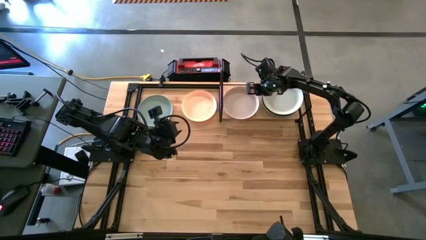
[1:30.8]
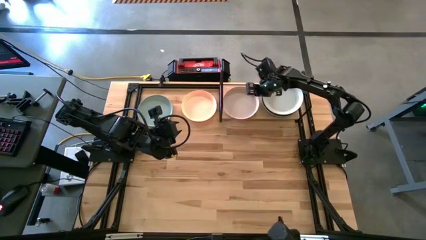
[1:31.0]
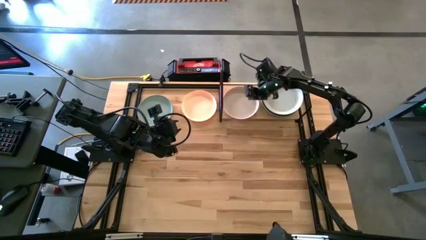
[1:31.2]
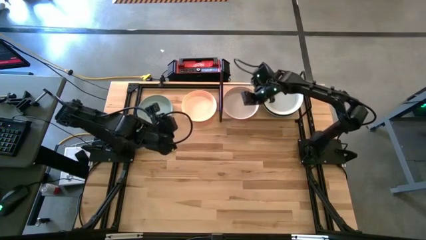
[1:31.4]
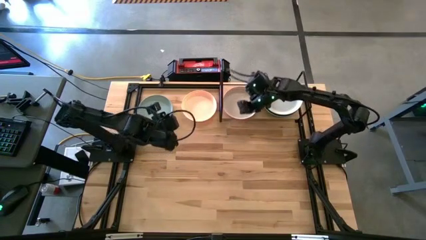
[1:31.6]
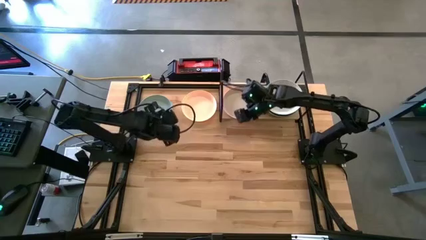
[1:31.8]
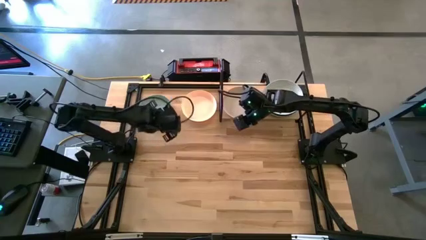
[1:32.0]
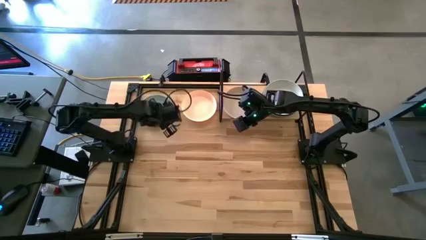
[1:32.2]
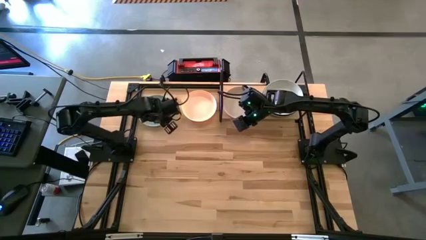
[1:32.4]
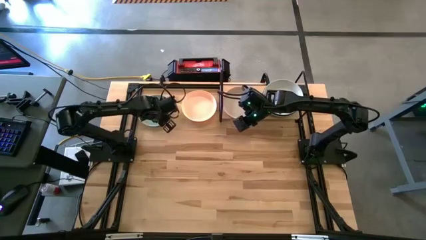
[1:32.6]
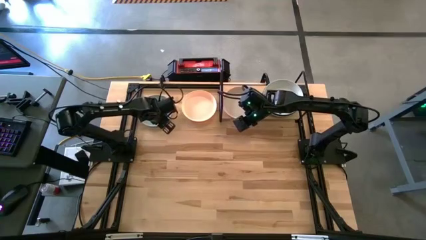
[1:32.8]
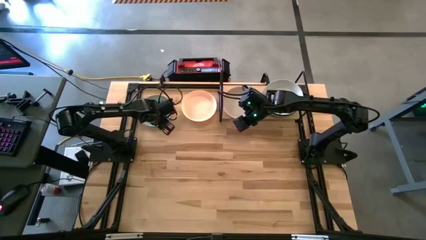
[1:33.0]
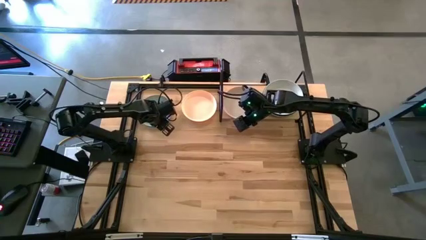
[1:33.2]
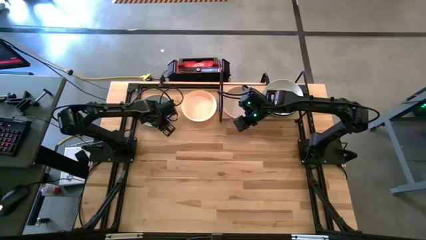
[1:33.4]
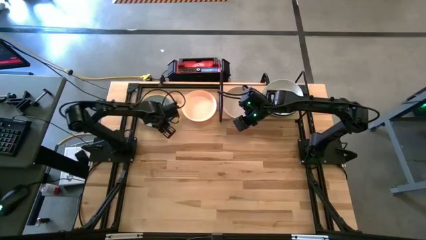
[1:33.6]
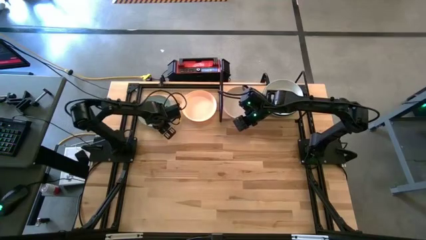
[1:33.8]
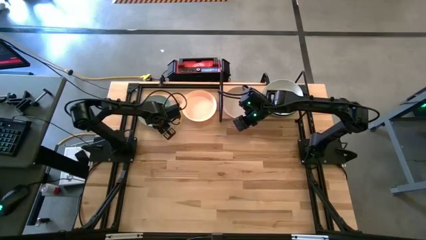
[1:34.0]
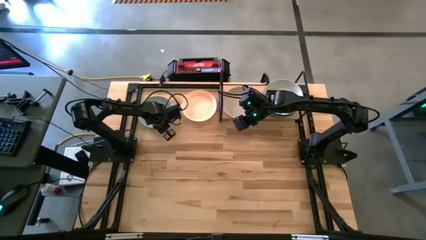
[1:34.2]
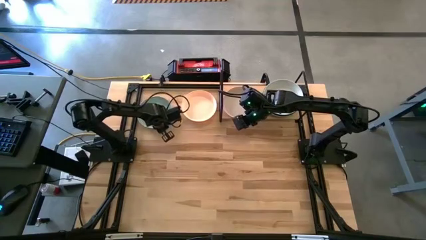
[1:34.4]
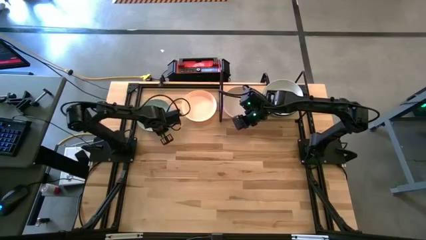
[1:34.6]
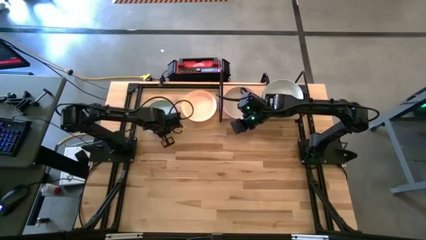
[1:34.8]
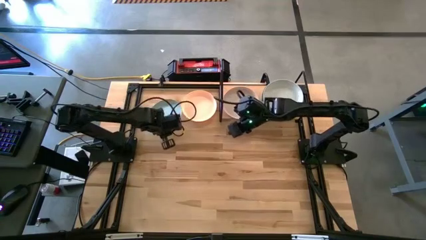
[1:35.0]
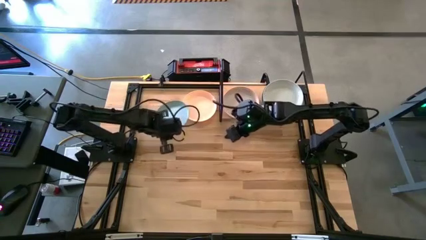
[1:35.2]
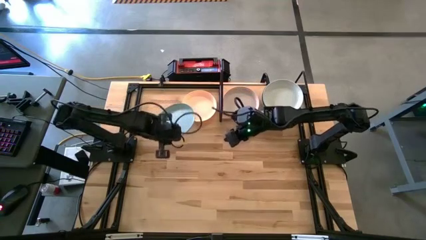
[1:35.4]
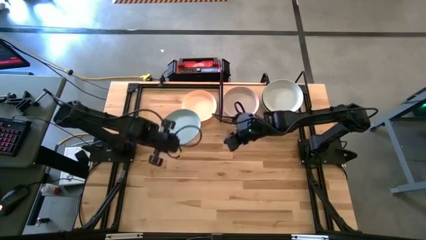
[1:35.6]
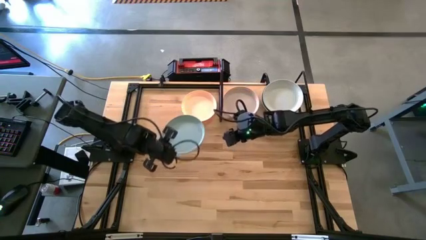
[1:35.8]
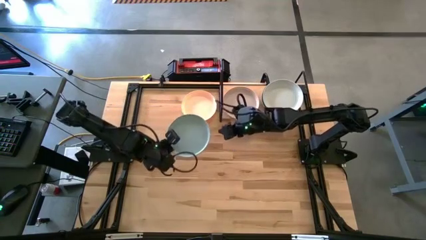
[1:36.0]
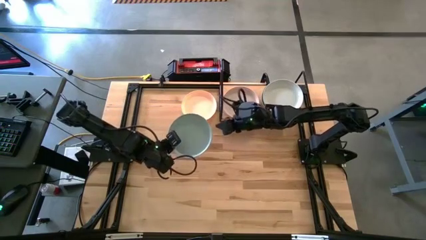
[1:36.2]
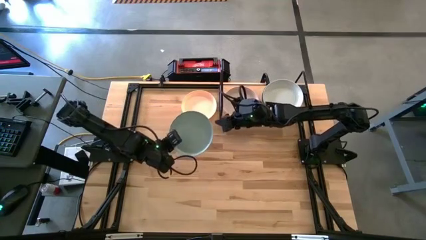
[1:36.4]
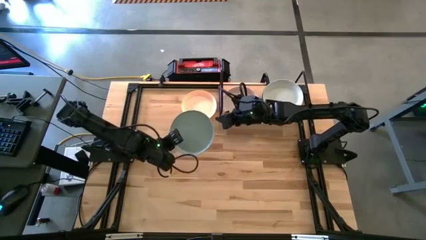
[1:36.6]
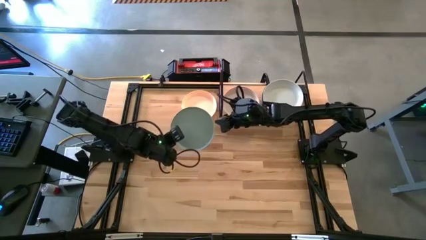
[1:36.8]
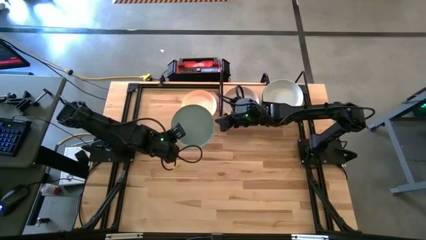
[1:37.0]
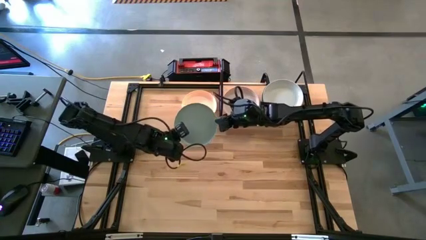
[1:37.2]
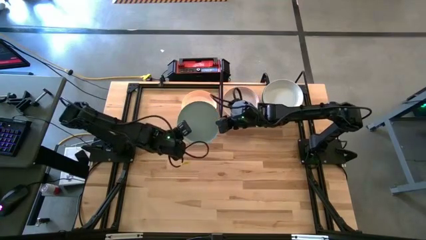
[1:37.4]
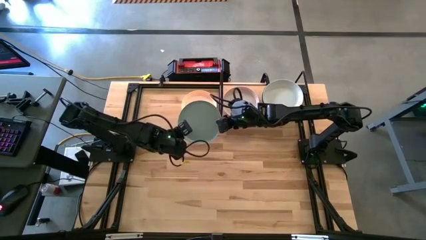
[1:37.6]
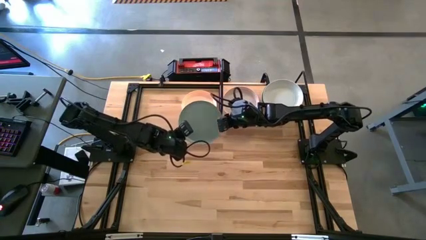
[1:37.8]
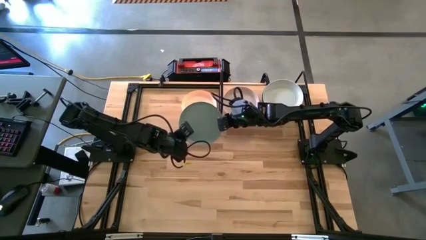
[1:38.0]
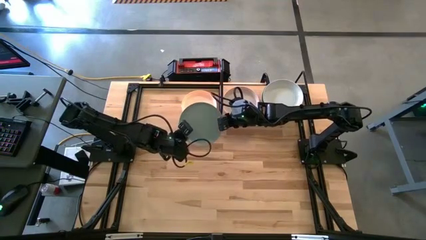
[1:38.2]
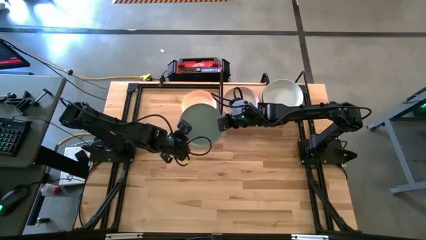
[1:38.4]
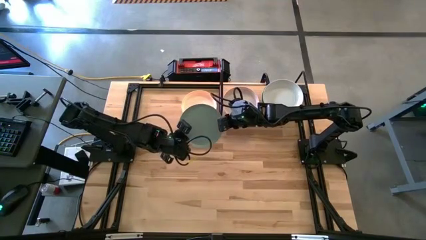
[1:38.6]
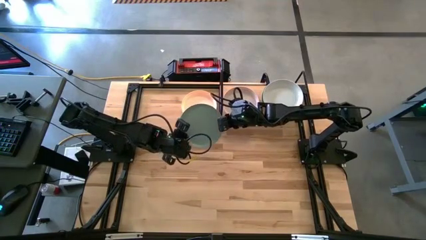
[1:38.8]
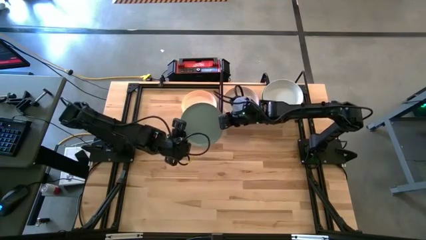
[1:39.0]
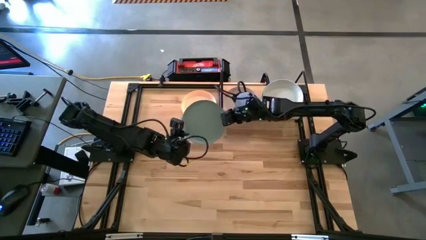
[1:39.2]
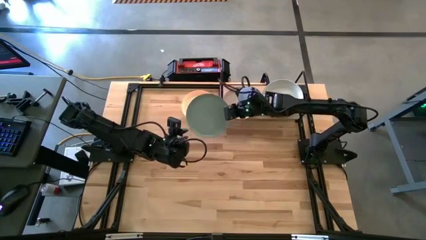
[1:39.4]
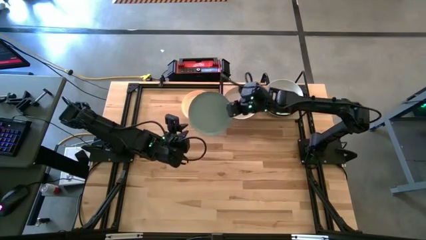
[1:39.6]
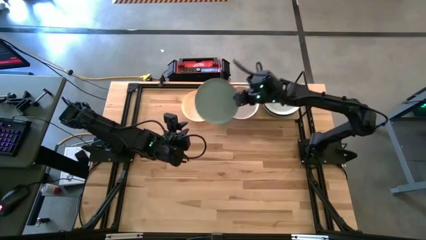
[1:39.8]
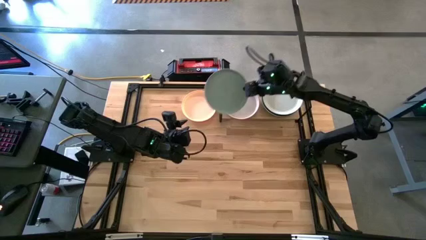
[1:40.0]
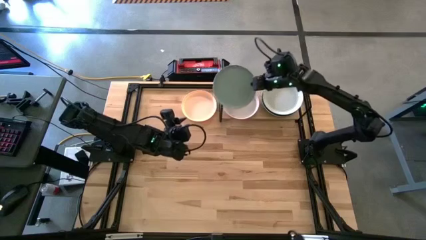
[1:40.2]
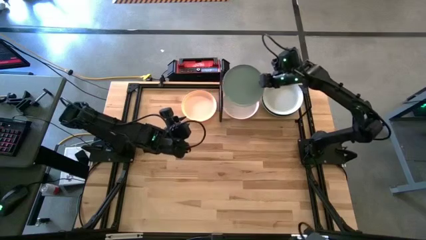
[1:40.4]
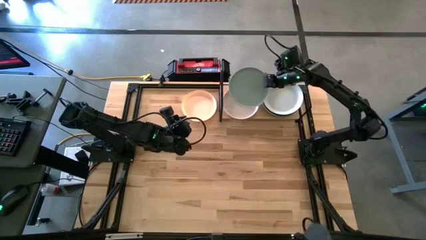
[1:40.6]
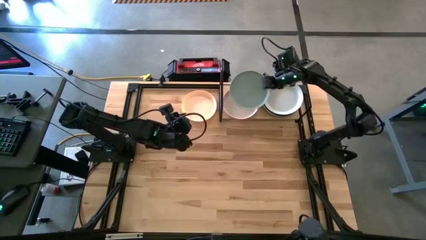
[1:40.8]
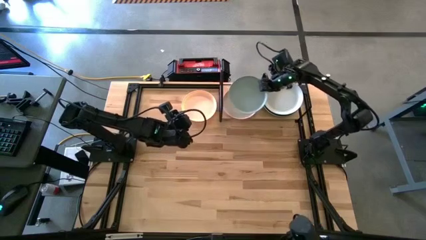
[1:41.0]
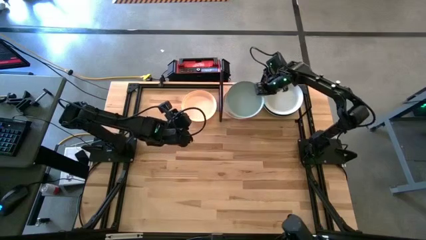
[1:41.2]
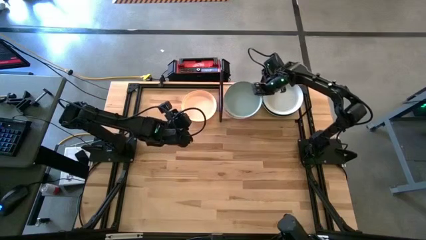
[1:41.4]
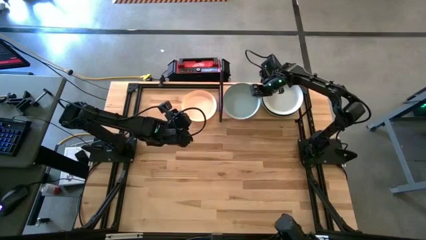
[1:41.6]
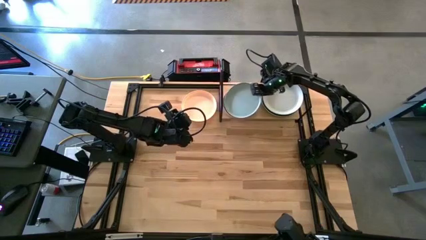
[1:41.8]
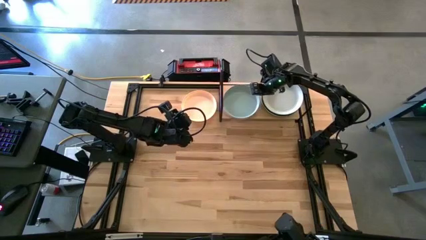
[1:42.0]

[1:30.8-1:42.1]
Task: Place and stack plates onto a shelf
Stack the light blue plate on top of the light brown plate

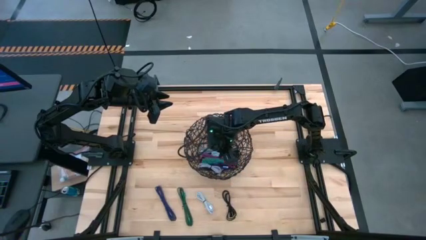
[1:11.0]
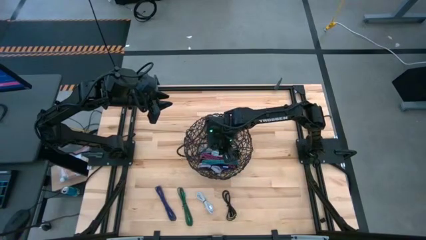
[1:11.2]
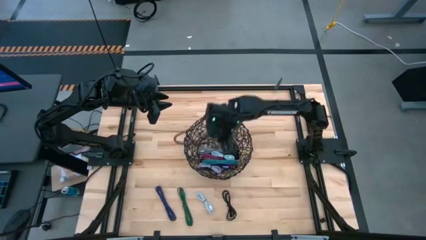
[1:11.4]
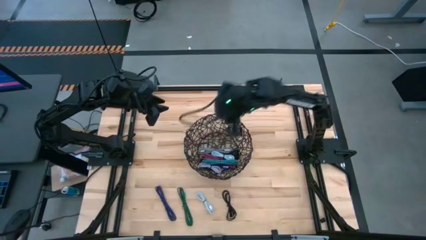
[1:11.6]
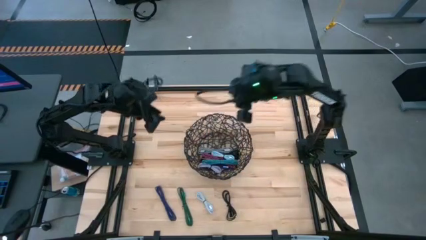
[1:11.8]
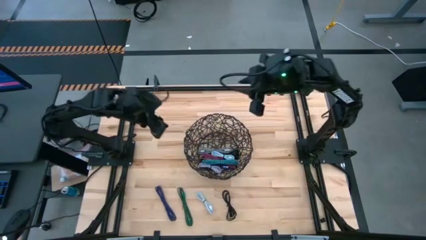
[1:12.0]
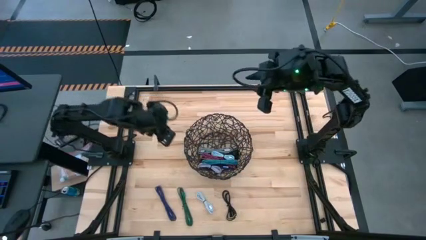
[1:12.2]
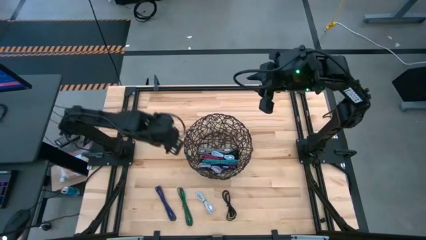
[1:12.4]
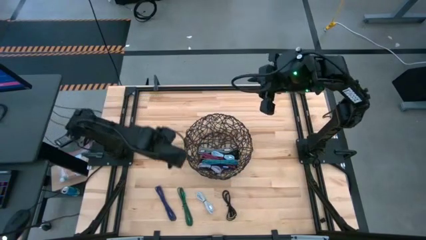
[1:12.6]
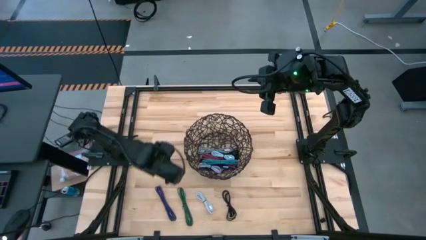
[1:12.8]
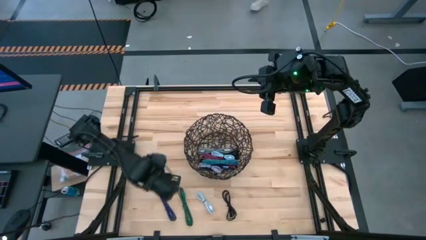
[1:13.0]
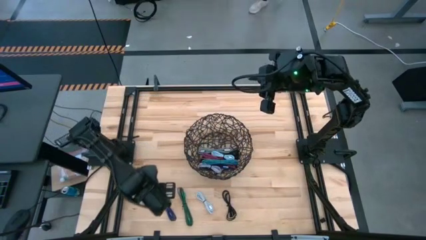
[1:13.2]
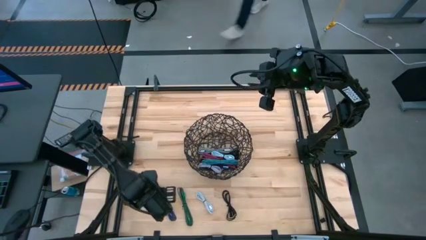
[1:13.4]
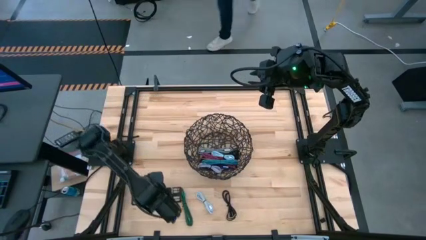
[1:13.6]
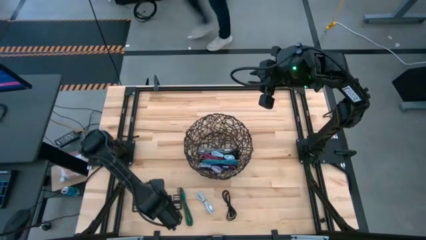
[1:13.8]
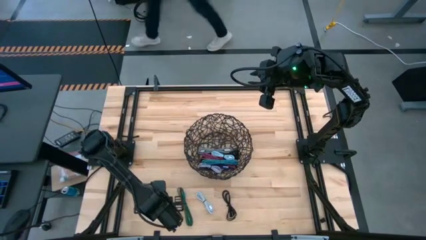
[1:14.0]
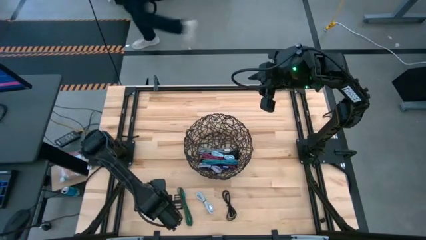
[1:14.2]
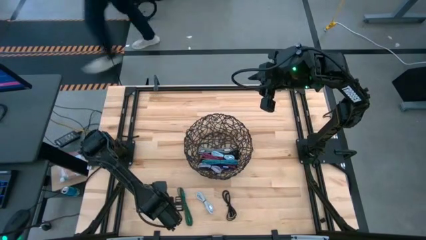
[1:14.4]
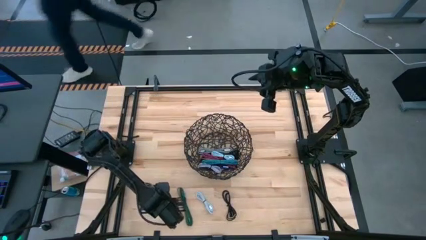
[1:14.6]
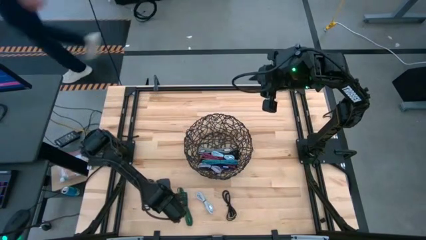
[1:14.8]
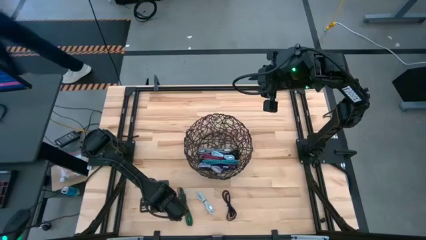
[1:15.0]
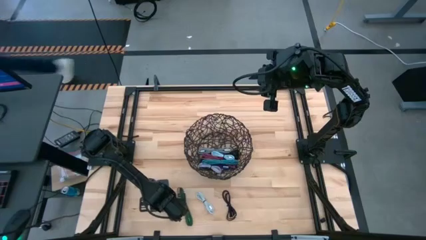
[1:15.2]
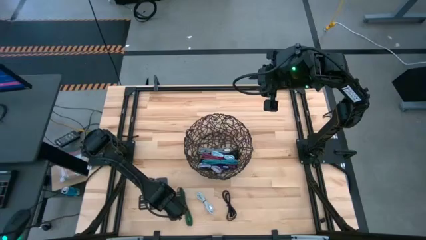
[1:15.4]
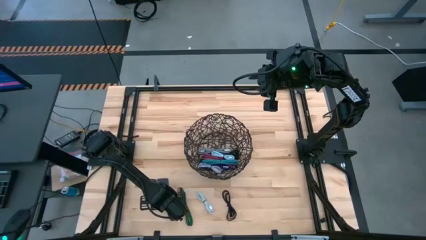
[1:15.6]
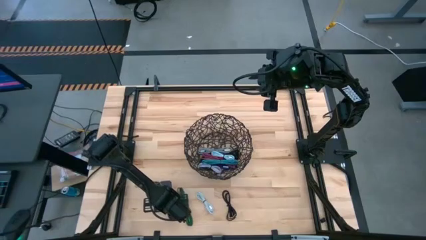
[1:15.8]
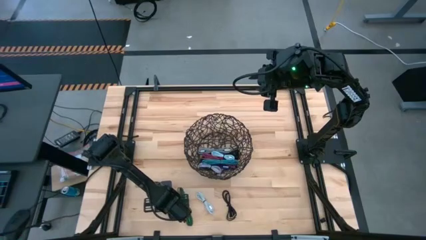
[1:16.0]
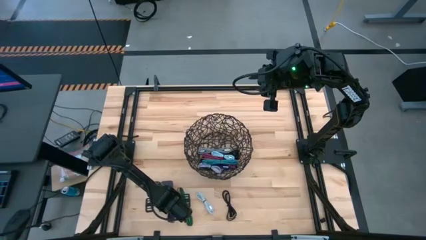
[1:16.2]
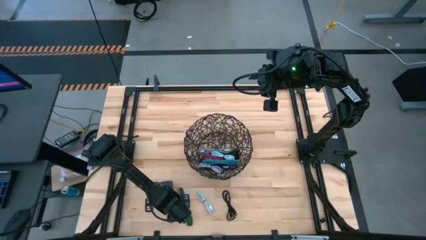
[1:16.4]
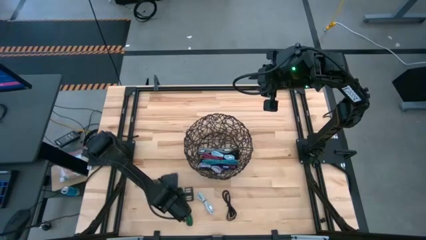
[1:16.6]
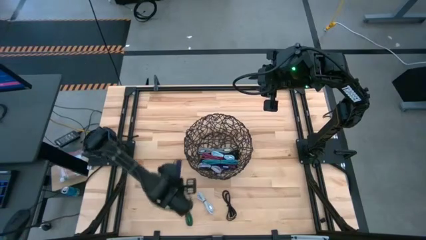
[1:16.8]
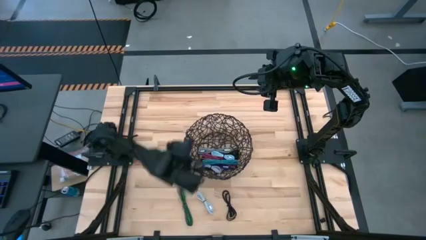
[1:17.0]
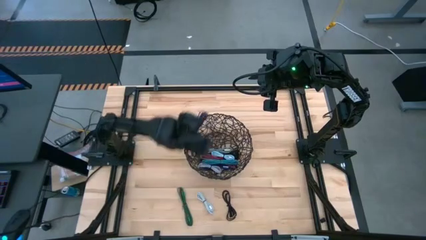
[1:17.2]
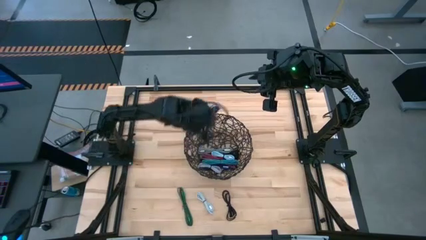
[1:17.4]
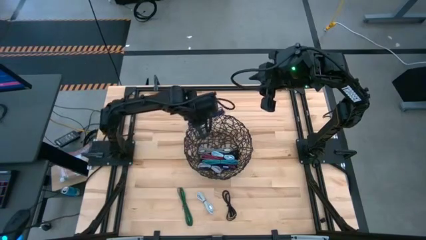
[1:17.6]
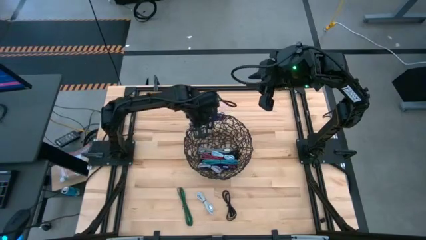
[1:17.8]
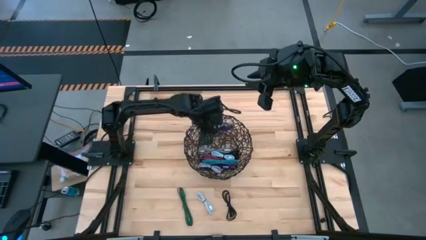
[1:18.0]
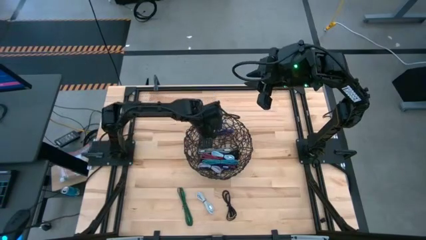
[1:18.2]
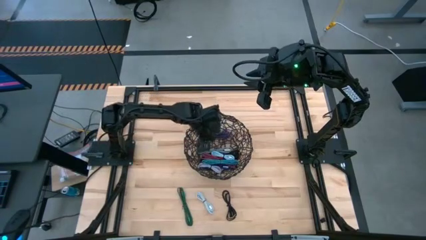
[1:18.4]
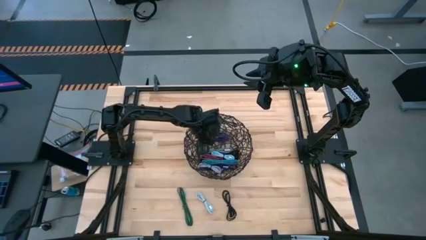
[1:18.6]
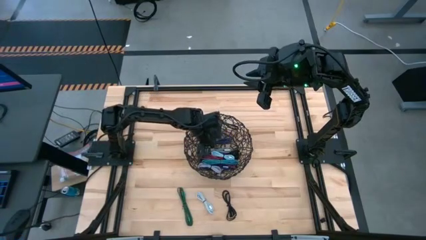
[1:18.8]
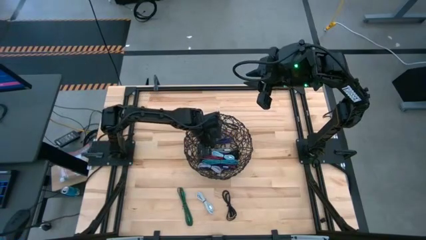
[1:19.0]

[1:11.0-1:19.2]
Task: Pick and place USB-C Cables
Put the dark blue charger cable into the black mesh basket
